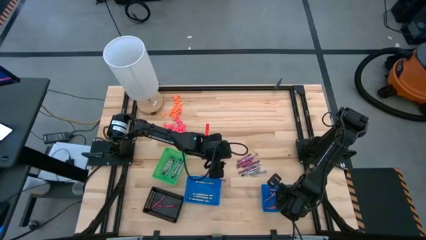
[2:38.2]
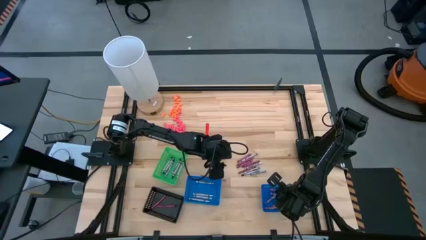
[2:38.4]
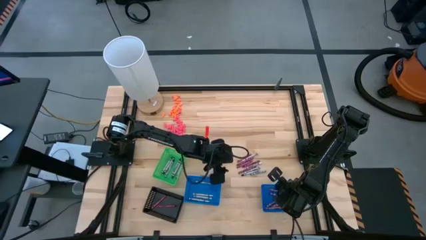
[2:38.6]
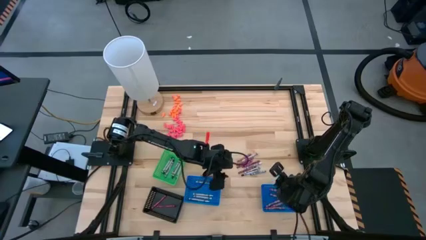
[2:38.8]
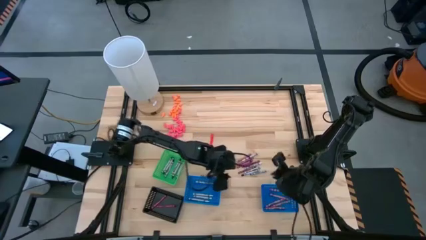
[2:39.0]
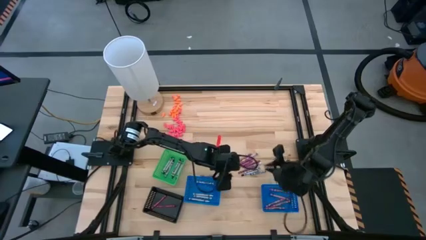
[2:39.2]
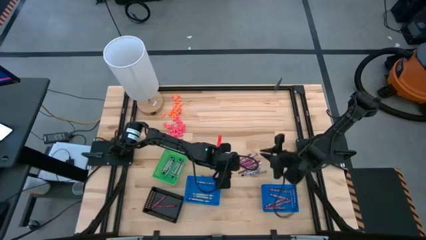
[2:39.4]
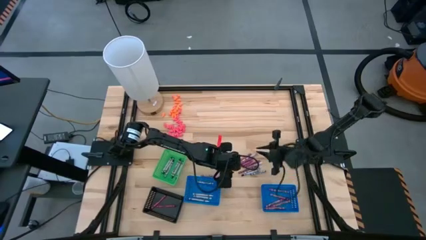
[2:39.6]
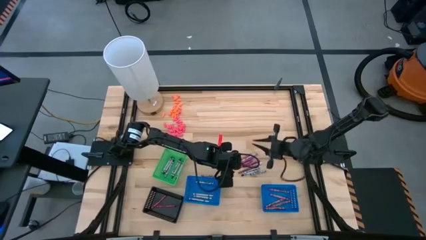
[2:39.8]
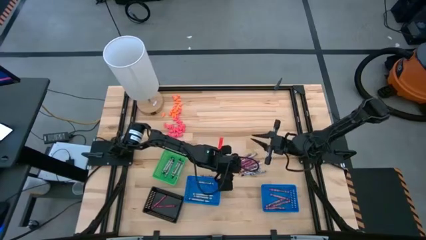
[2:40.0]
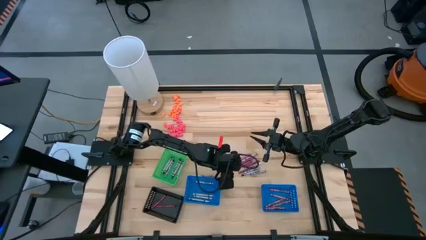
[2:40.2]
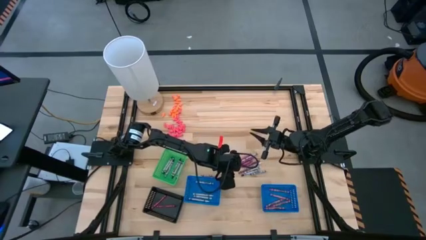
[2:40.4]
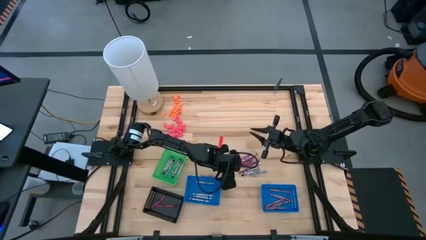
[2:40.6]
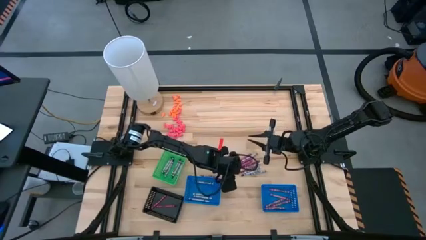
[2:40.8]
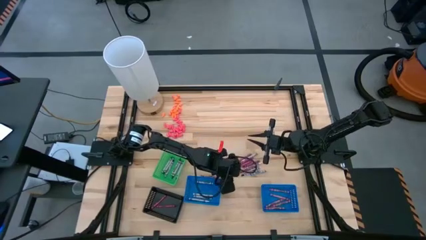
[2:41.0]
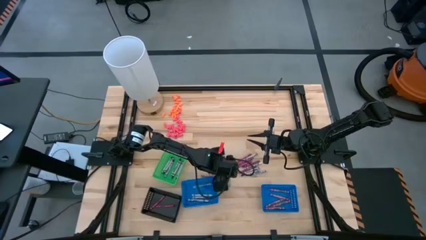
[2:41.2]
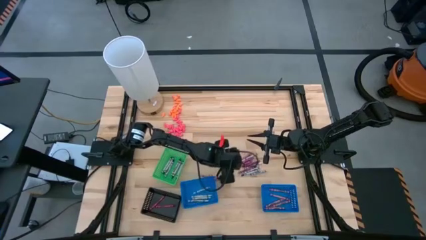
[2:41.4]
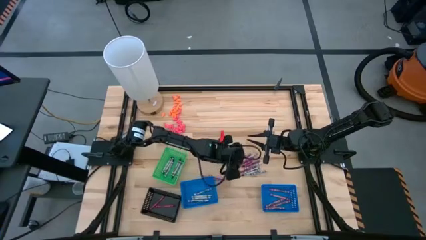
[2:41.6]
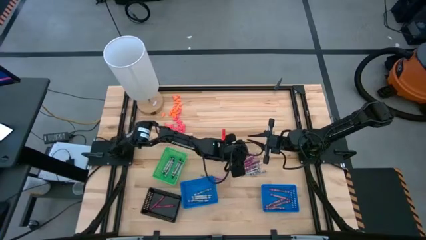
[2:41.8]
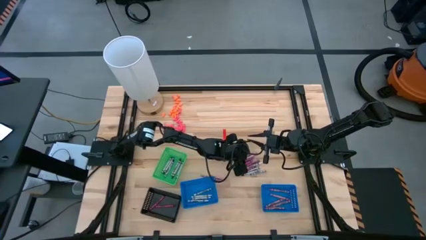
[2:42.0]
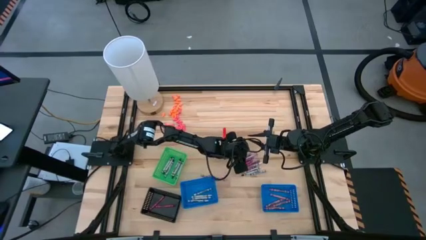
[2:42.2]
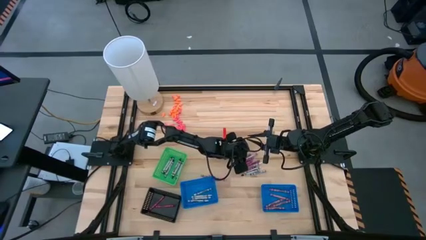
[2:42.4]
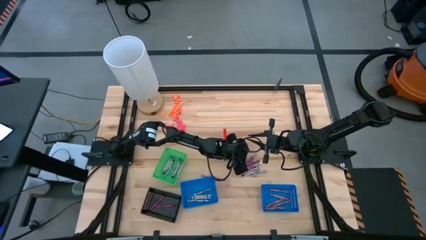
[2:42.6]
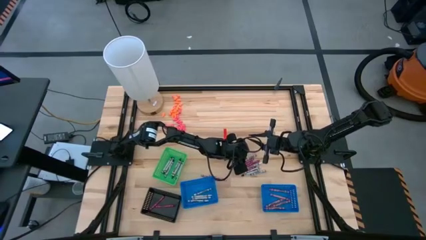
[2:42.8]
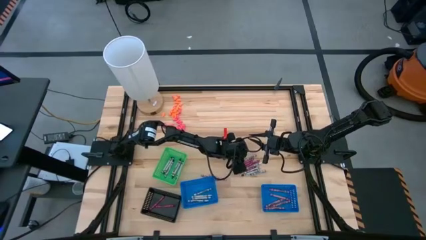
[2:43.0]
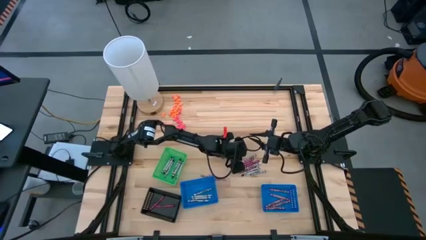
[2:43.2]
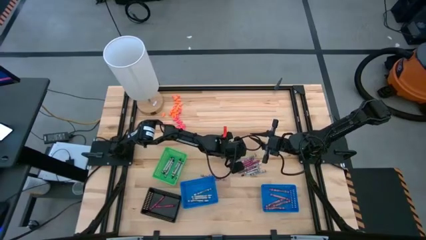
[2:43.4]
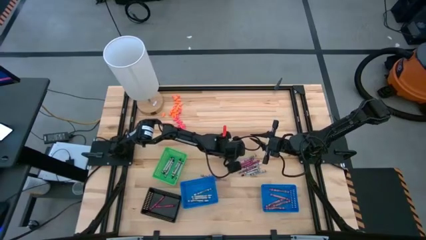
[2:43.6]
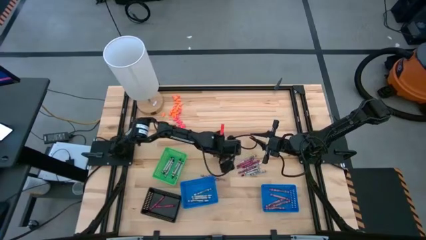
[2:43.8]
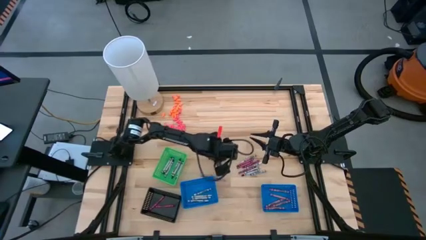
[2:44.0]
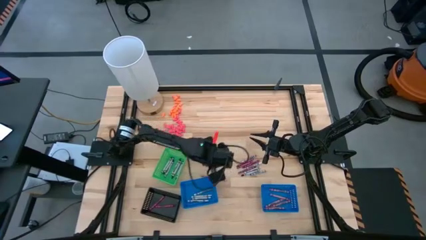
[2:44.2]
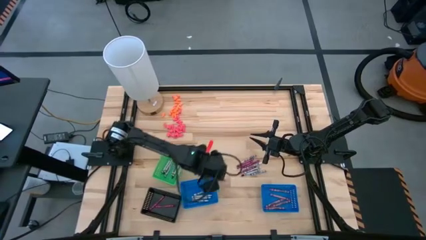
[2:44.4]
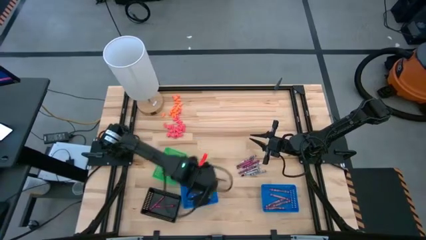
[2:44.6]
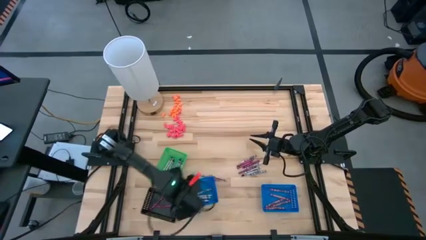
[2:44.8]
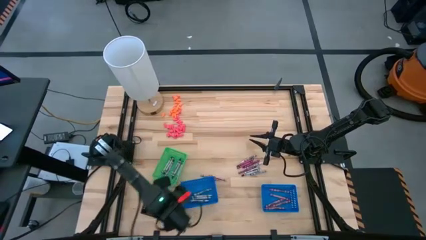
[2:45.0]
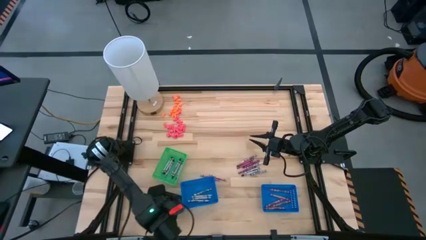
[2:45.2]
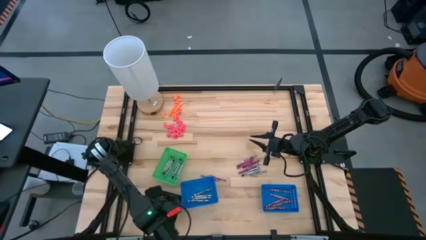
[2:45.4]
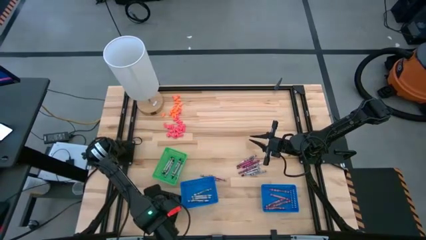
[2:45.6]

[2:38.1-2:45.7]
Task: Sort crayons
Put the red crayon into the black basket

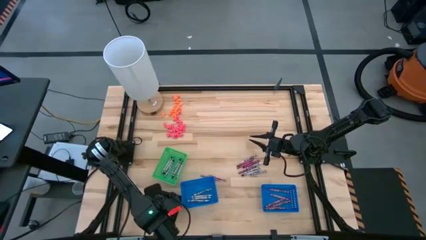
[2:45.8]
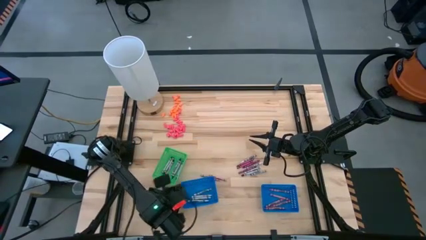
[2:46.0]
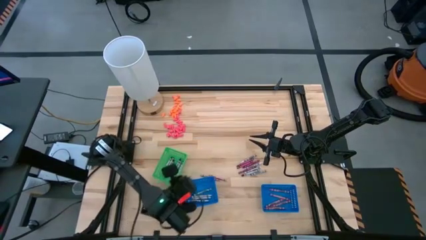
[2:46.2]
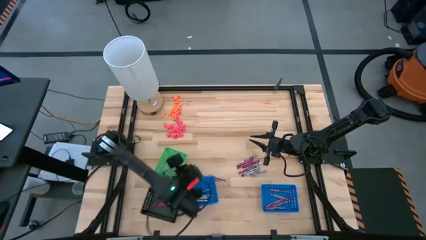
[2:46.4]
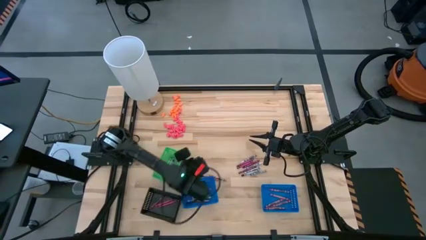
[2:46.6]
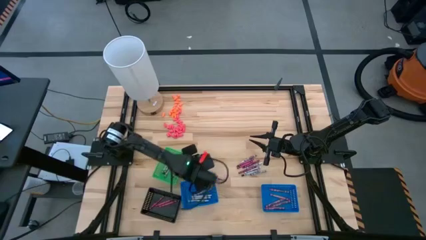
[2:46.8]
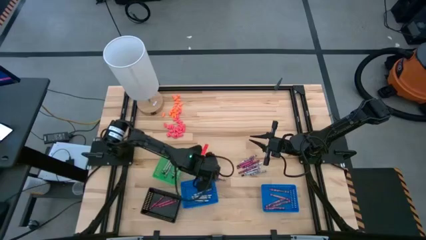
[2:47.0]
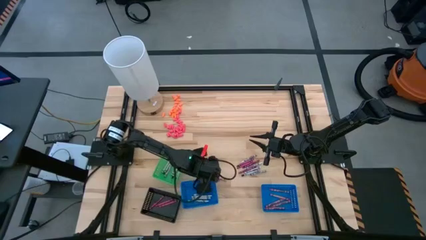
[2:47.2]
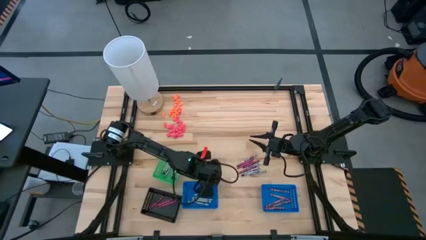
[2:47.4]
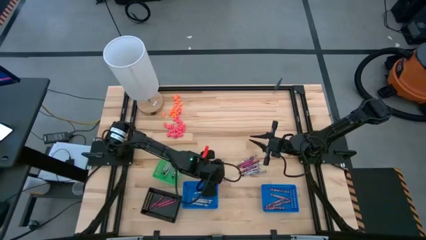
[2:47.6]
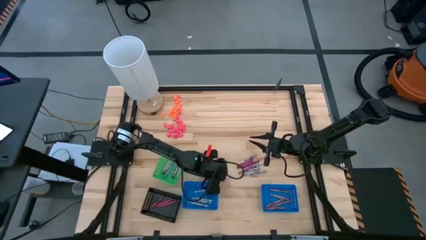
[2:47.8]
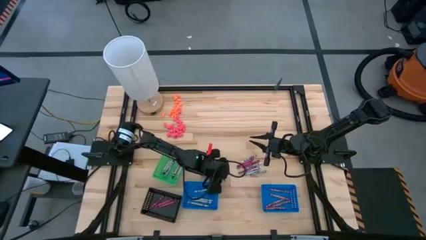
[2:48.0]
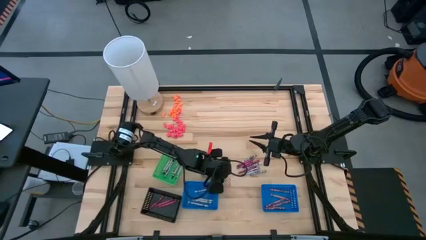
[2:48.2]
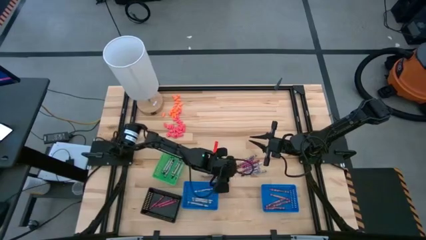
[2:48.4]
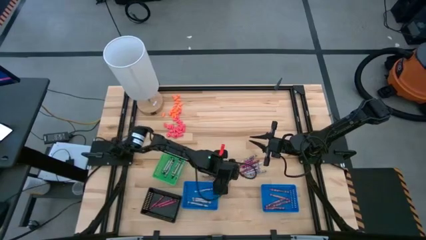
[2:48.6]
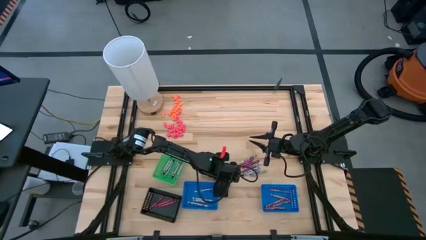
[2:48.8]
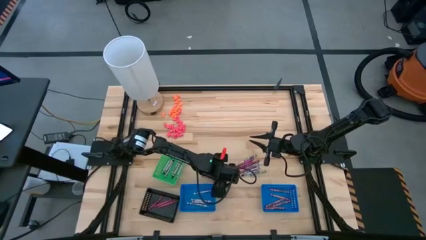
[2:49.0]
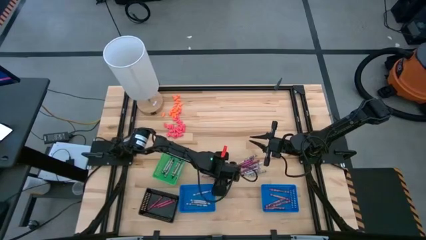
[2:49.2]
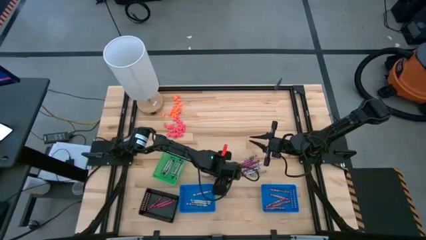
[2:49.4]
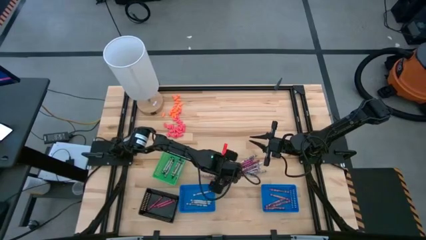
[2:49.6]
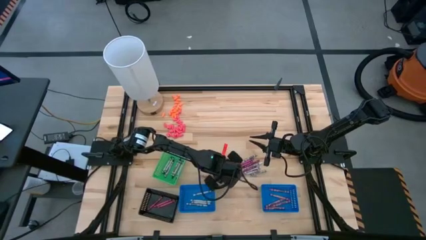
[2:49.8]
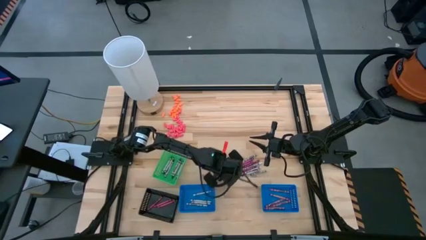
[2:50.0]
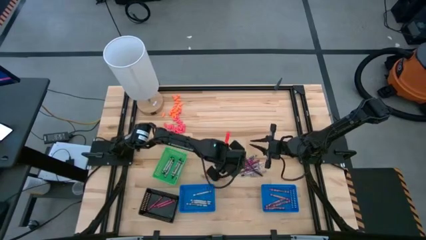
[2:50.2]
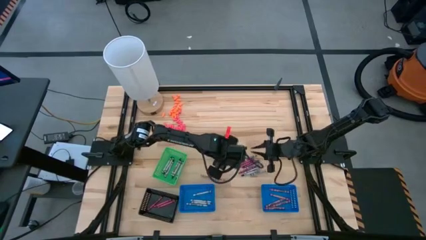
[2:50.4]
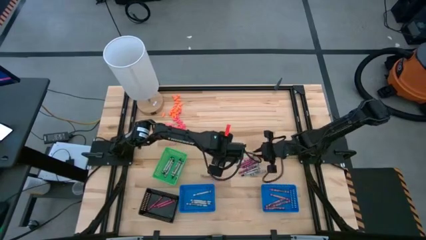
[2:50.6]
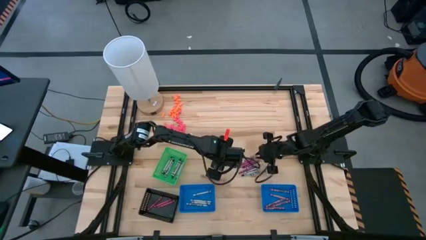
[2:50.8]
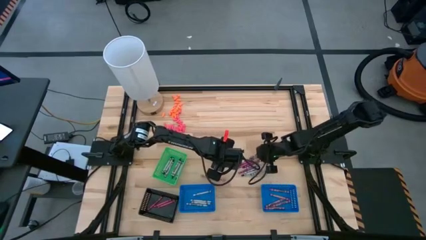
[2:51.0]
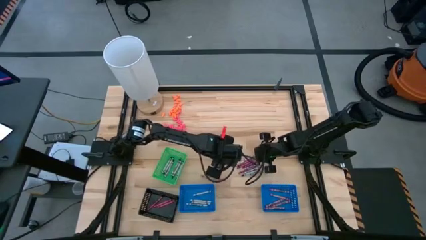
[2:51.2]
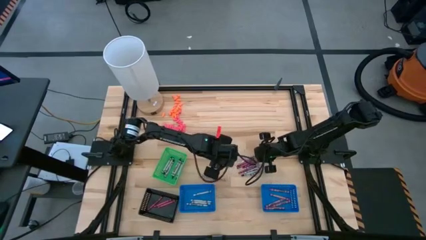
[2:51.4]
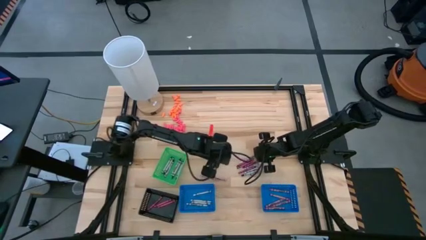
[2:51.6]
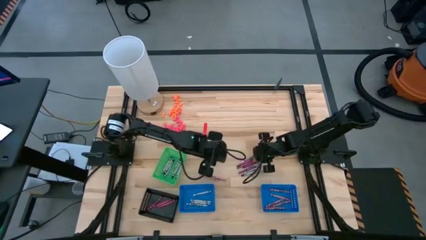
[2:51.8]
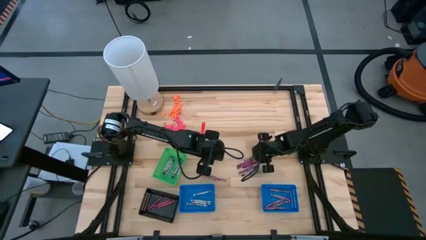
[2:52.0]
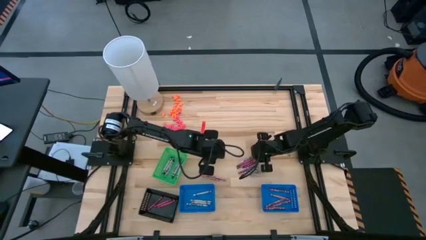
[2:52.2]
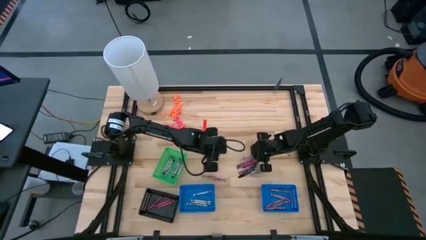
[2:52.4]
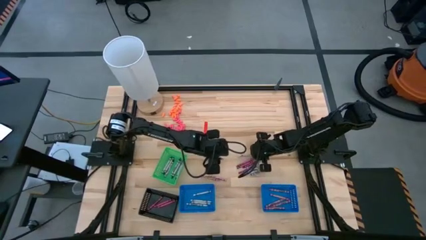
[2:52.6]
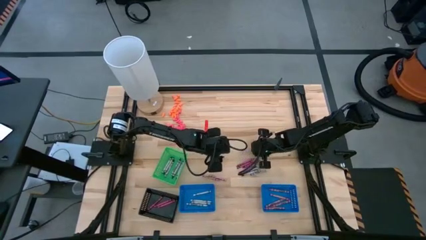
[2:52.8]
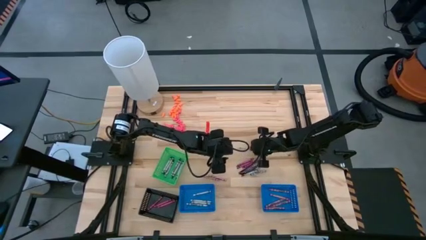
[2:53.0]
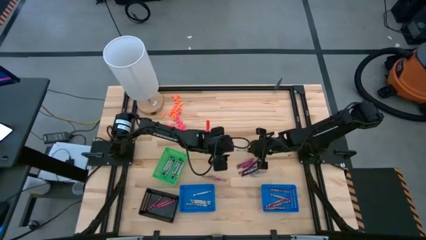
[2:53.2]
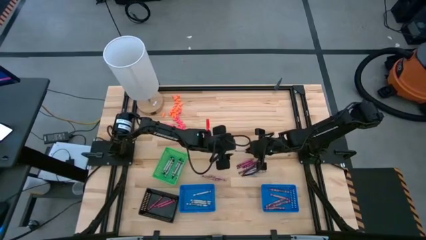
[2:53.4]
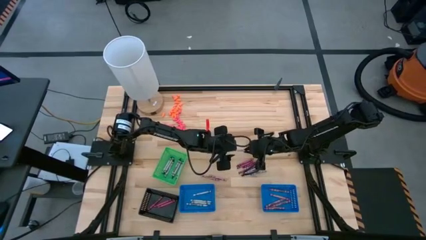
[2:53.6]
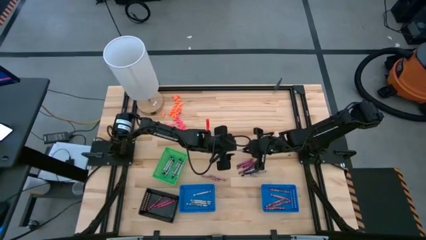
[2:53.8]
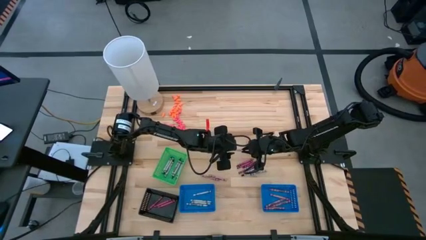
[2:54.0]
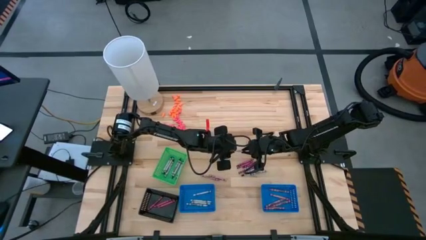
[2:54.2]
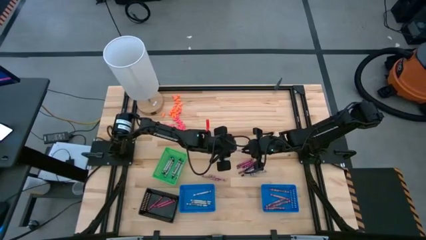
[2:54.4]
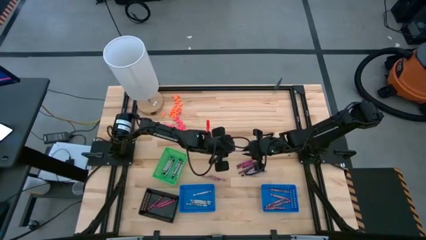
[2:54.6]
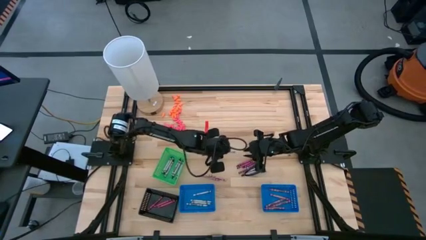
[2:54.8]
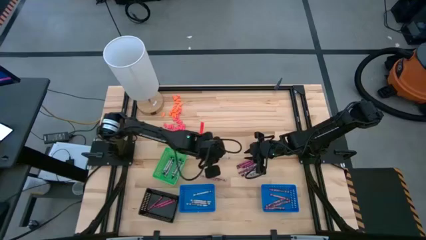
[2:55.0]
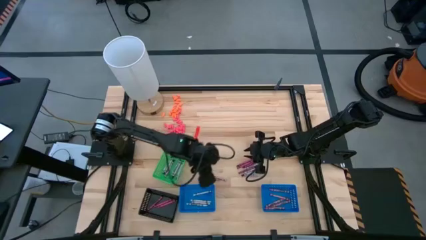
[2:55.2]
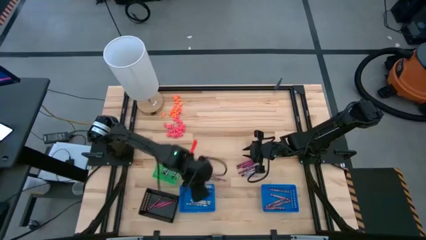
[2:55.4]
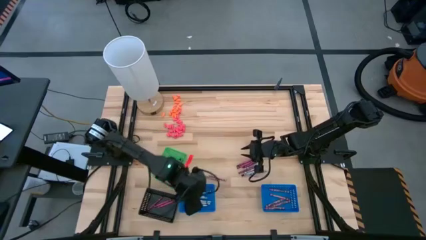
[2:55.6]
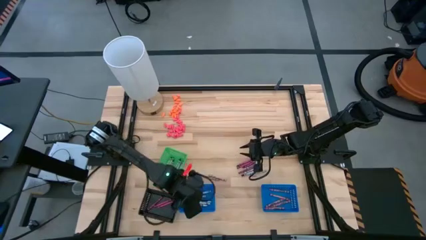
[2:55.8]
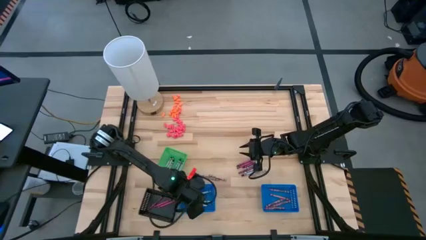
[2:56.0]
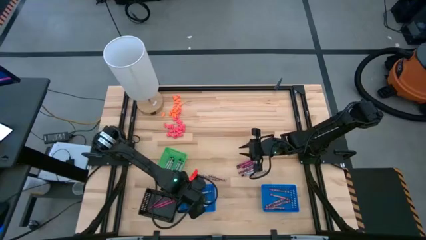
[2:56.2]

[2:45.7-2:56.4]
Put the white crayon into the left blue basket
